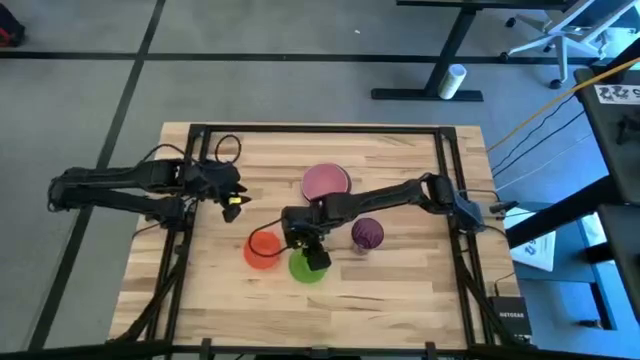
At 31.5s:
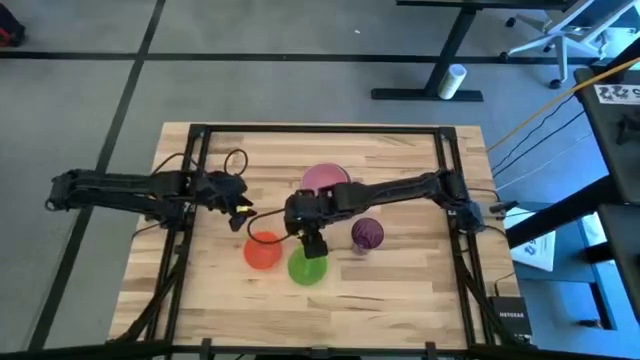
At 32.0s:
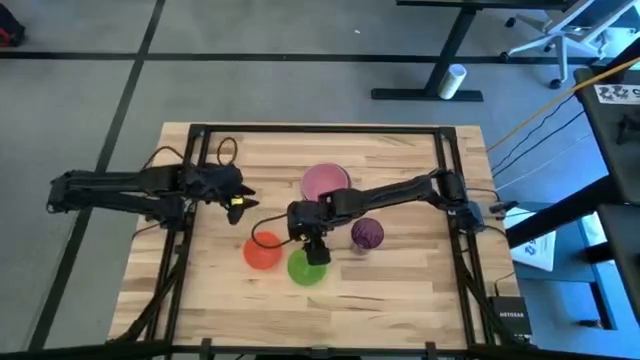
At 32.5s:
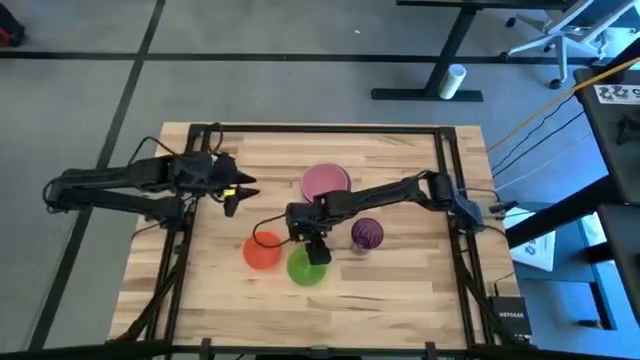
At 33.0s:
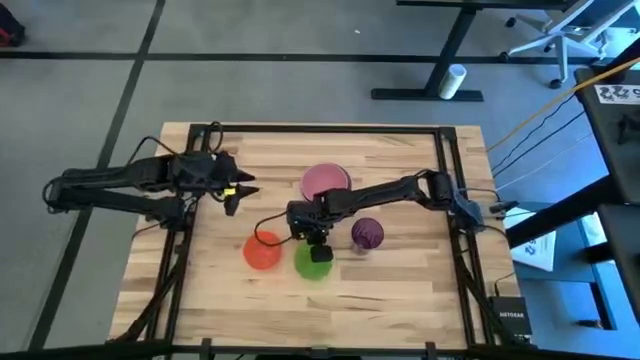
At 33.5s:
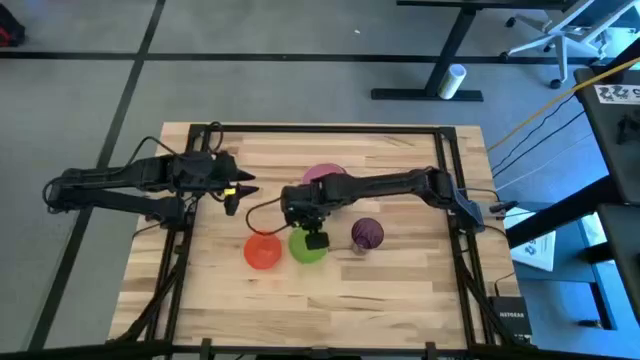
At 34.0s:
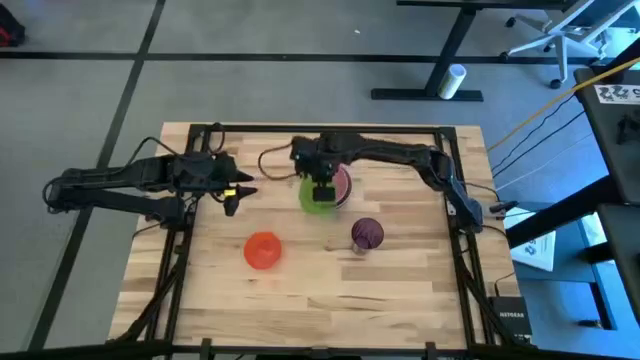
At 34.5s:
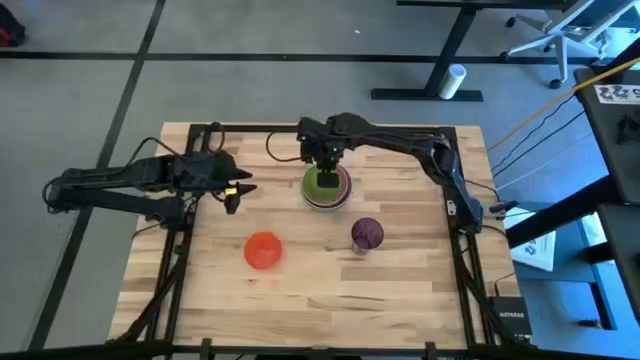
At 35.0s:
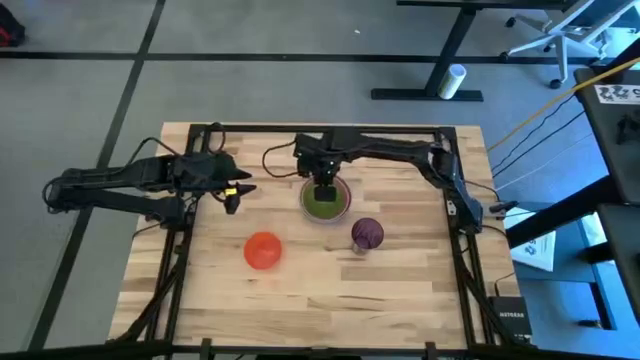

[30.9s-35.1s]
Stack the green bowl on top of the pink bowl

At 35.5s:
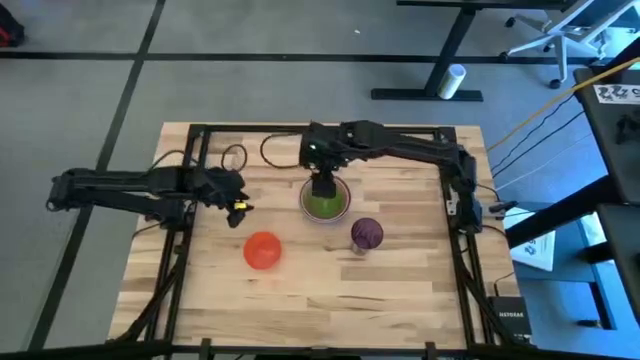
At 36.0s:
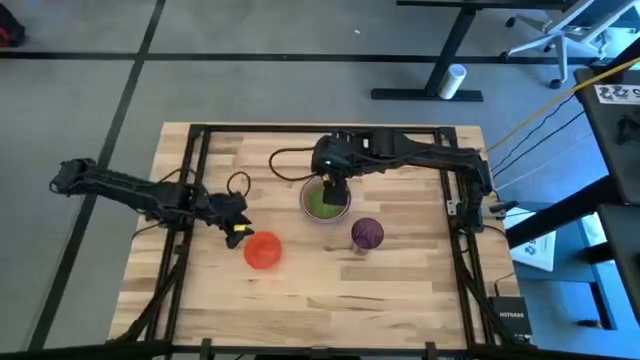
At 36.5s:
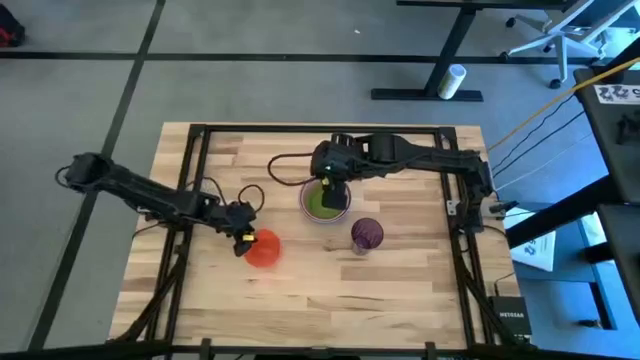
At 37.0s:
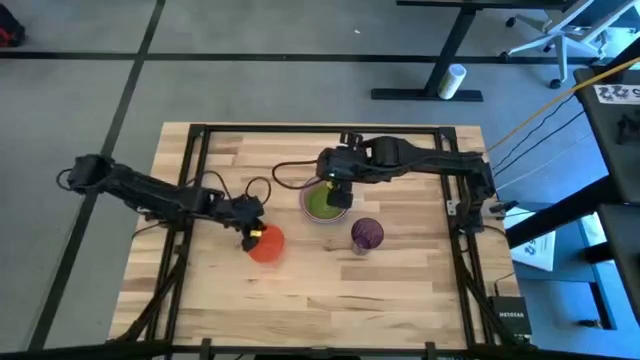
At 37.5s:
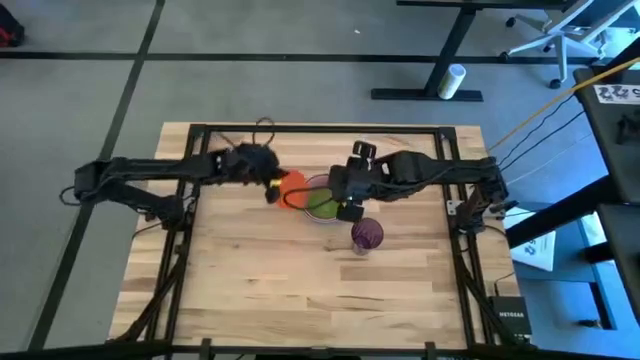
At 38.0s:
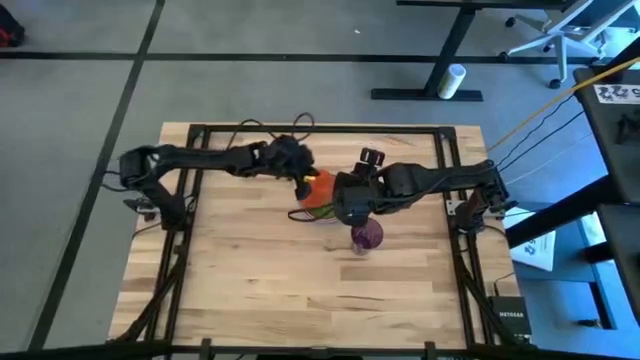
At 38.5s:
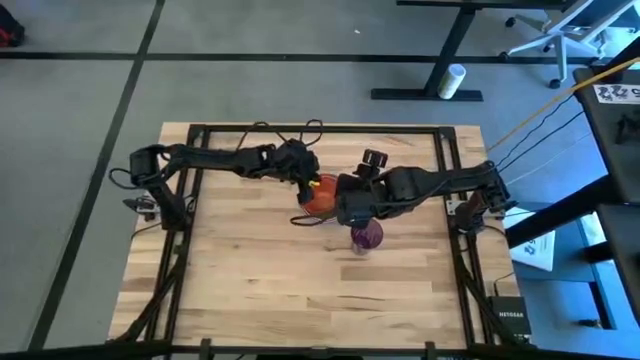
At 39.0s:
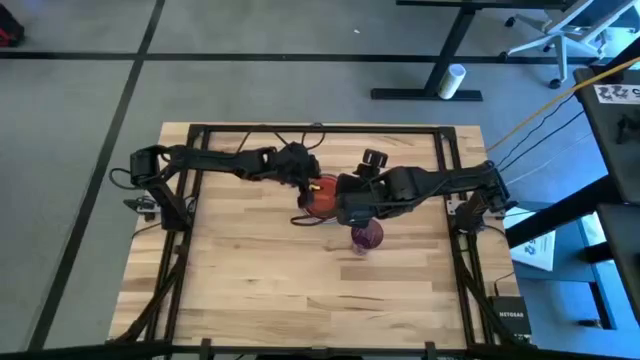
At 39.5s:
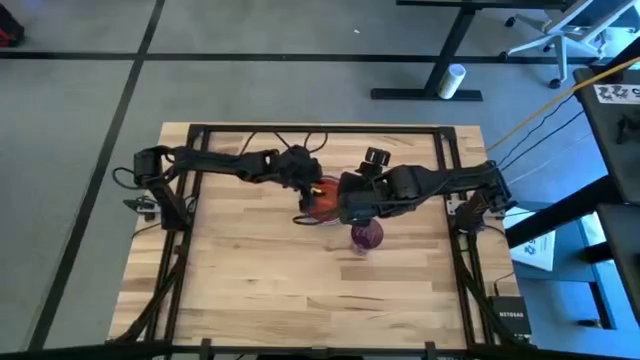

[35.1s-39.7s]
Stack the orange bowl on top of the green bowl

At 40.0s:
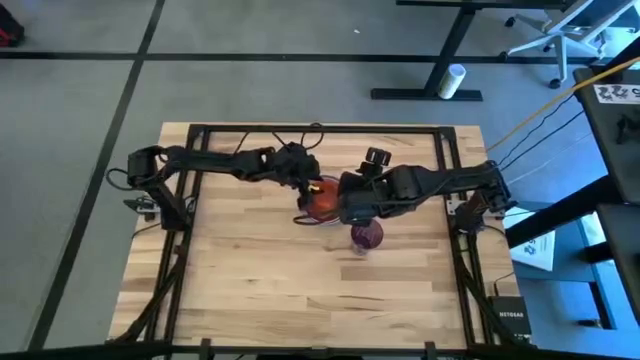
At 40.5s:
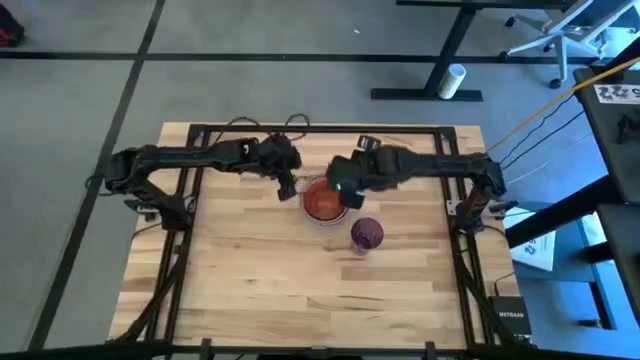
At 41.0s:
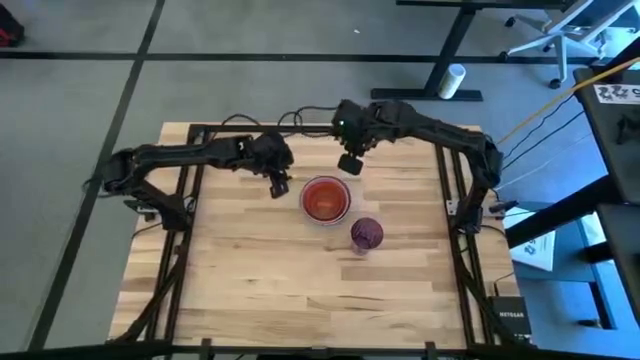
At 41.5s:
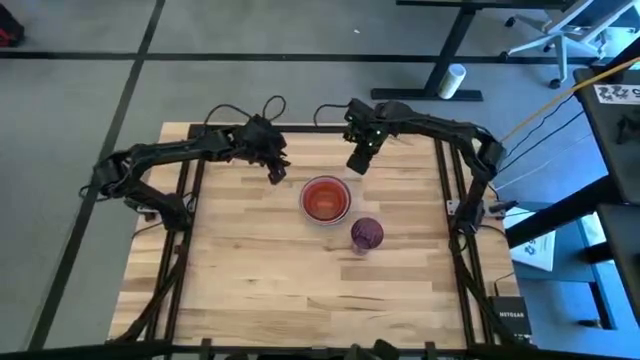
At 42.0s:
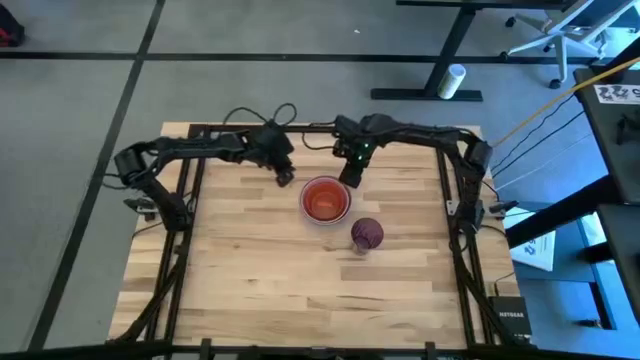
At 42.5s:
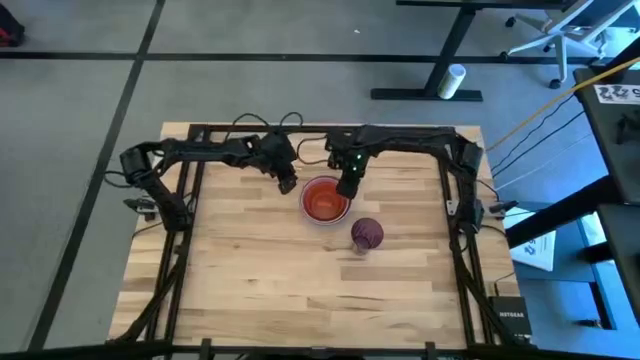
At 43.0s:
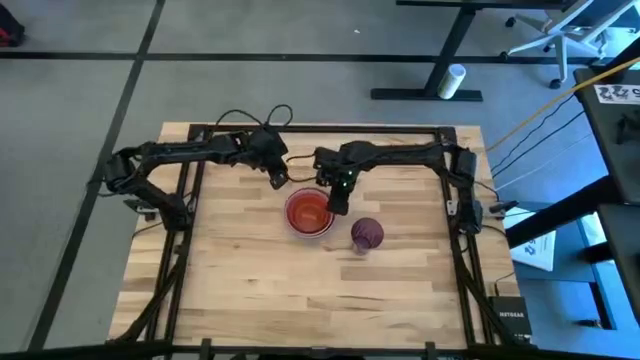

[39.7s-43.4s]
Adjust the stacked bowls

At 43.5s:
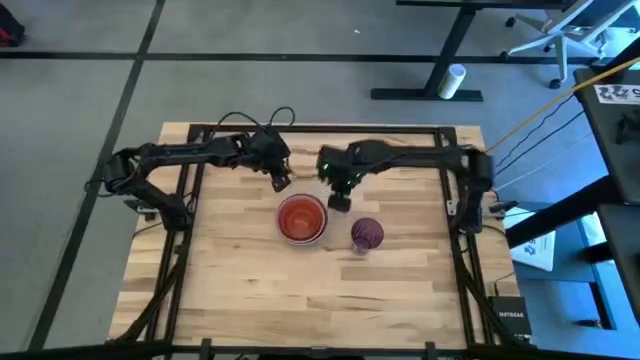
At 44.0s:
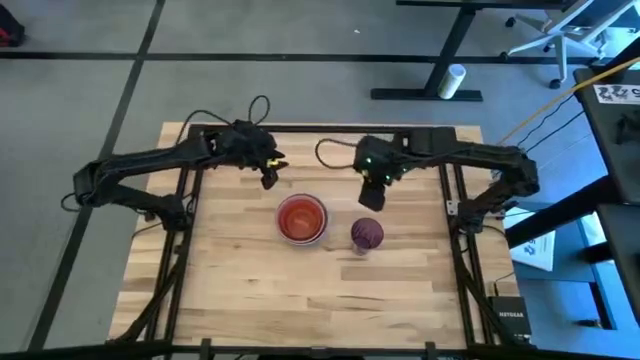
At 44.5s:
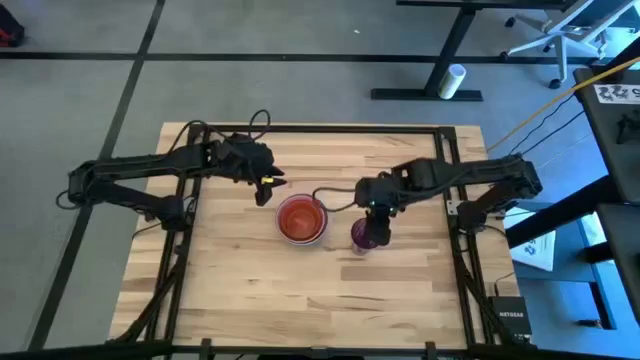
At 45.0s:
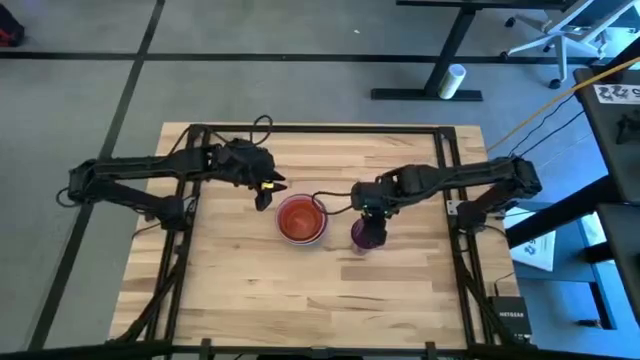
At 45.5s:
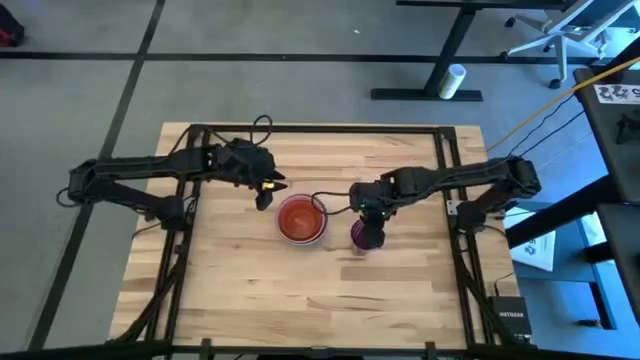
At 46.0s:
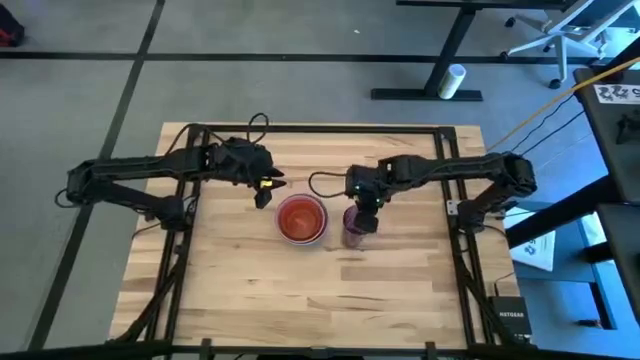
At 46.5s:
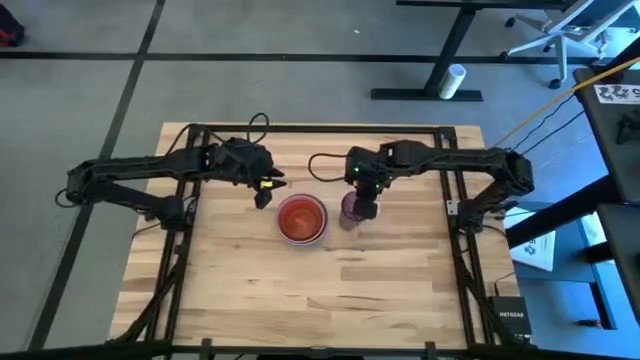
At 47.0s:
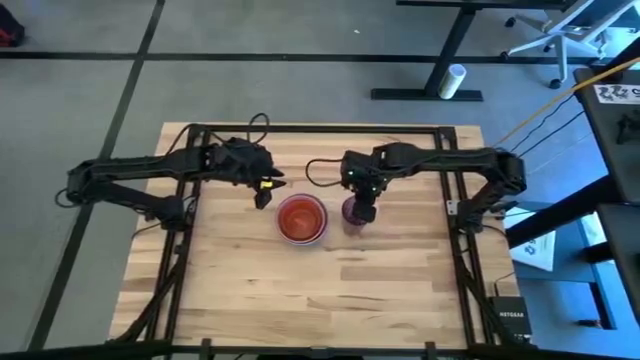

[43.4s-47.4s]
Adjust the purple glass

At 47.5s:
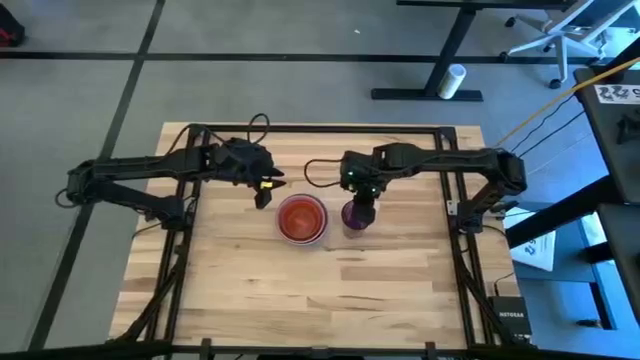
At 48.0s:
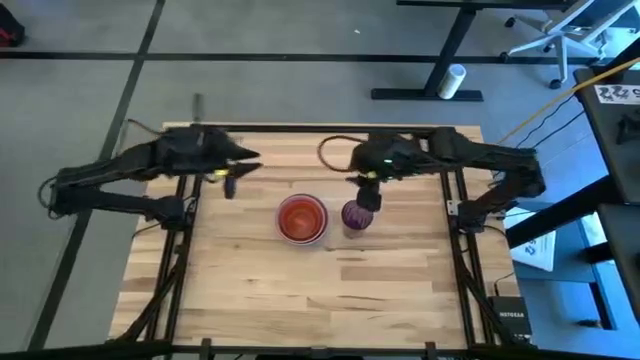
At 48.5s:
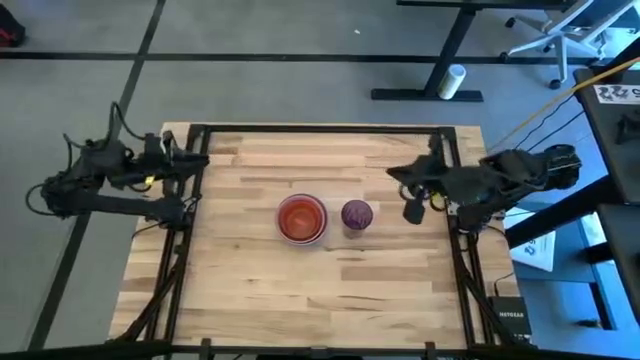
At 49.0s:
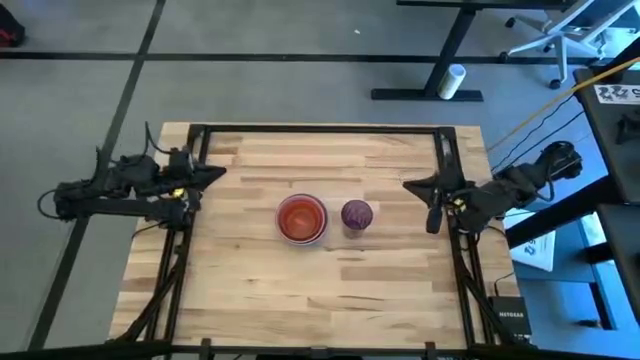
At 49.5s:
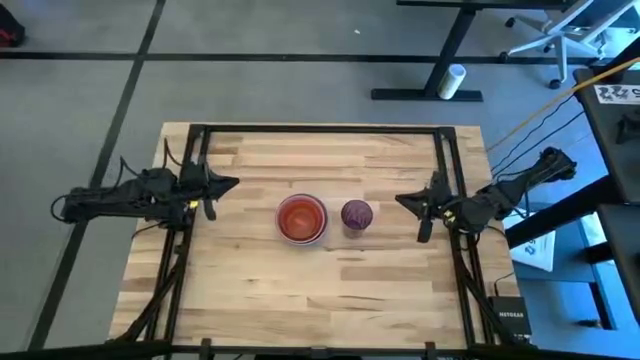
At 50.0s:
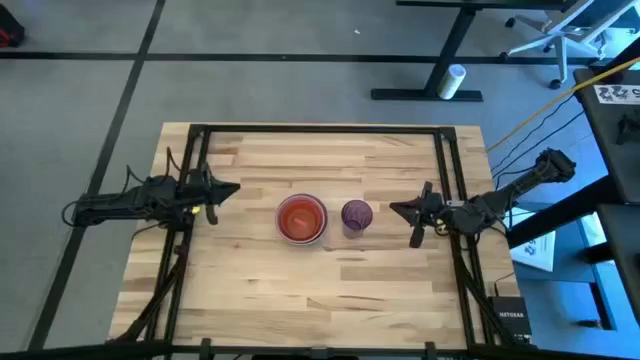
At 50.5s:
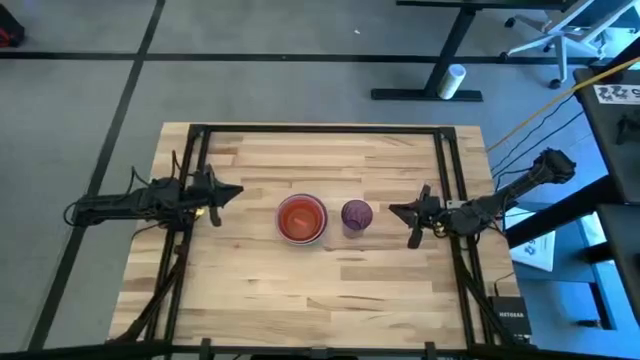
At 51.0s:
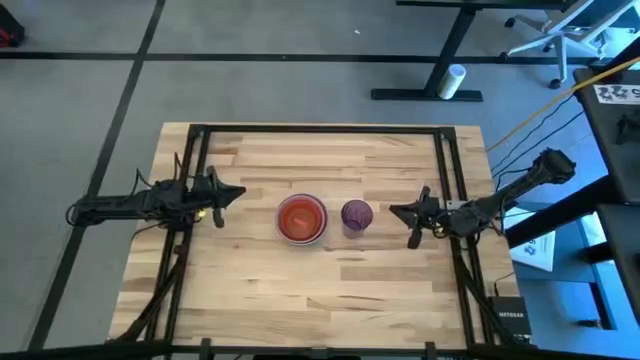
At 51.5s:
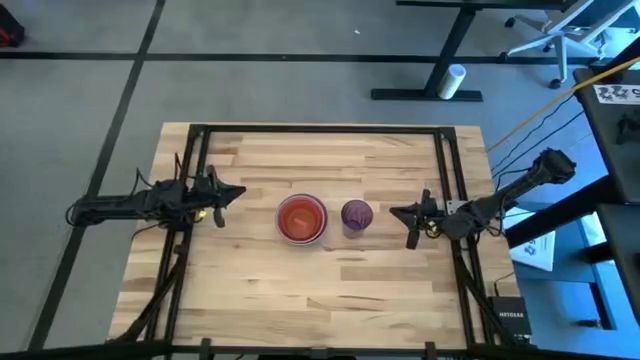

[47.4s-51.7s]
Return to Home Position
